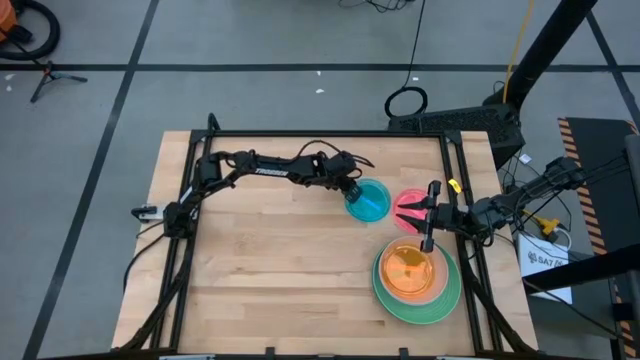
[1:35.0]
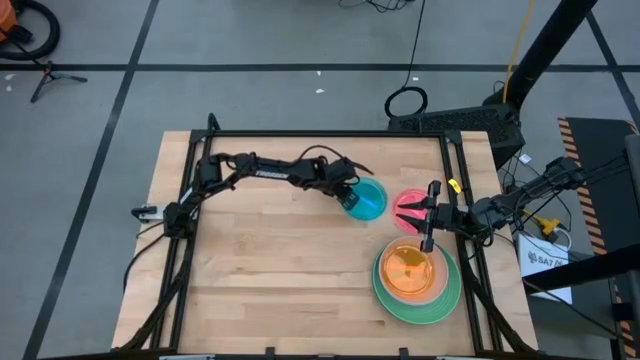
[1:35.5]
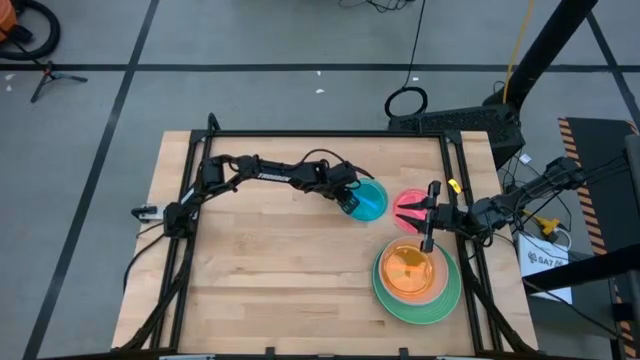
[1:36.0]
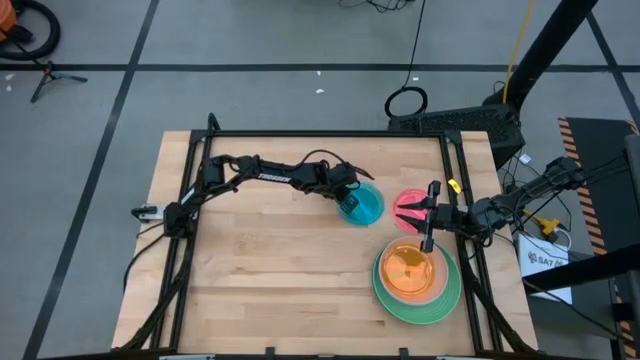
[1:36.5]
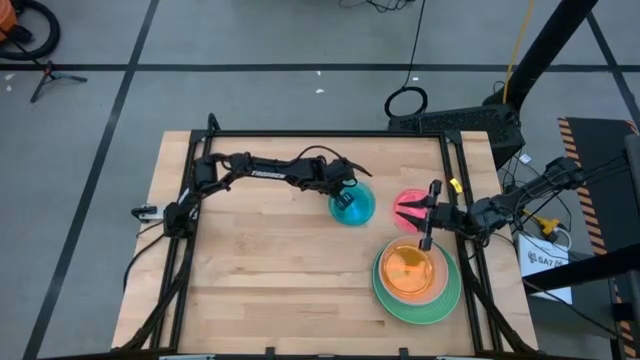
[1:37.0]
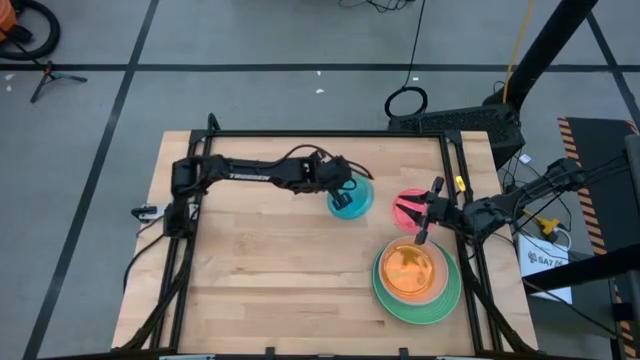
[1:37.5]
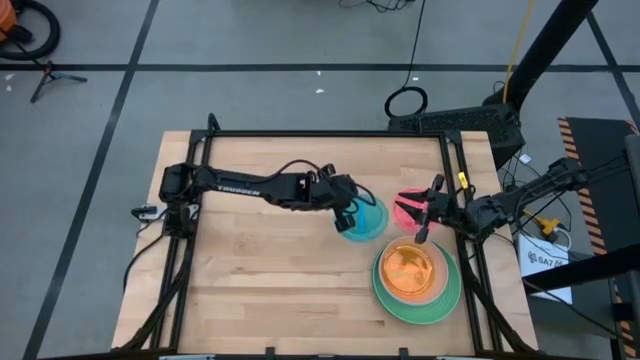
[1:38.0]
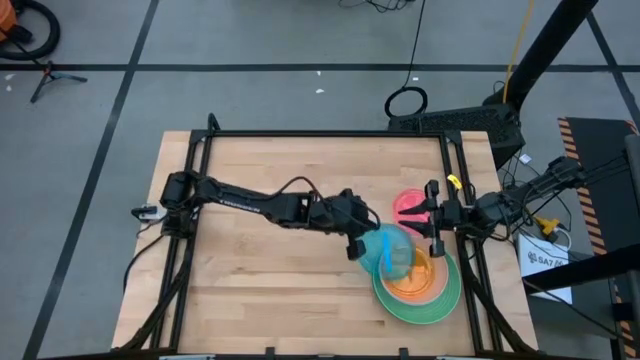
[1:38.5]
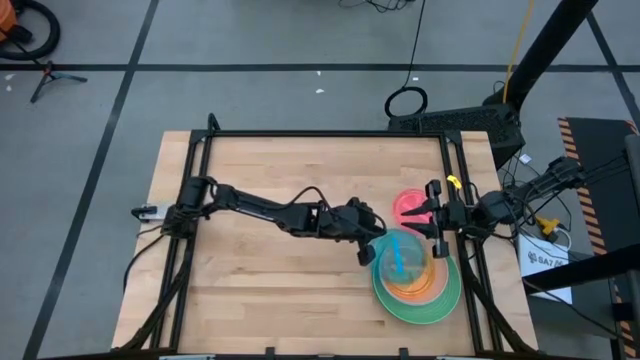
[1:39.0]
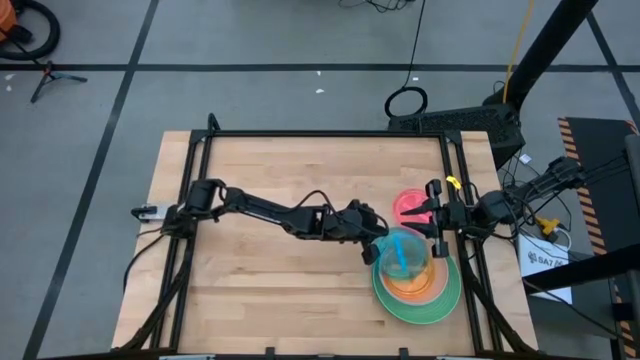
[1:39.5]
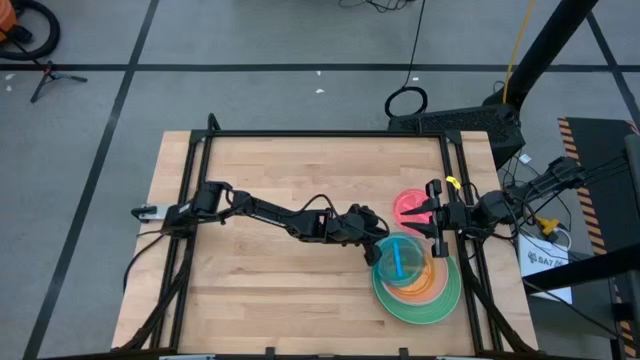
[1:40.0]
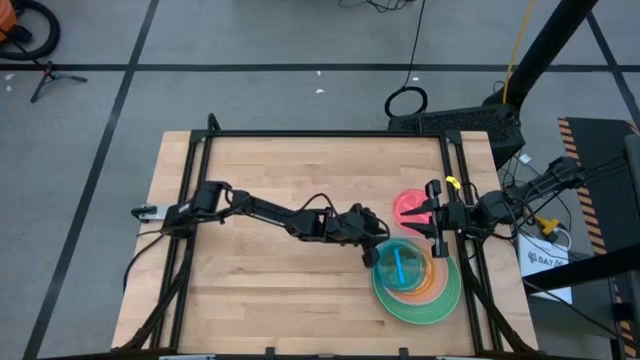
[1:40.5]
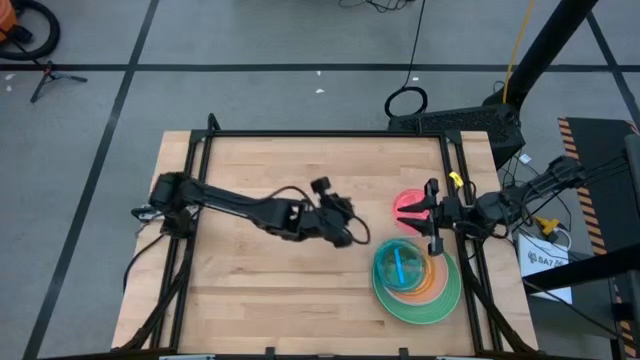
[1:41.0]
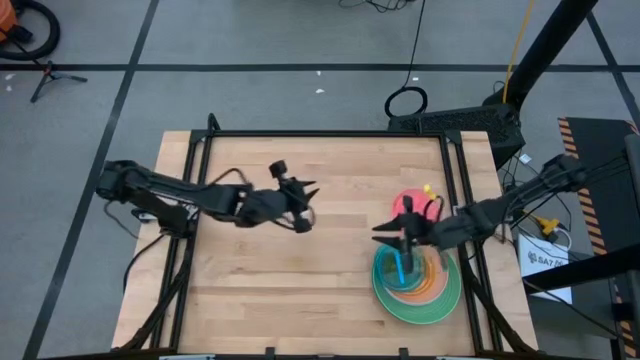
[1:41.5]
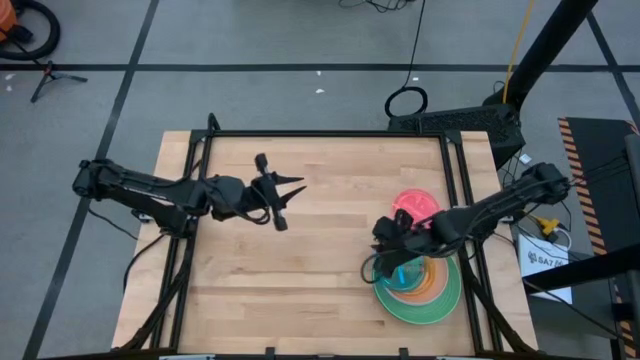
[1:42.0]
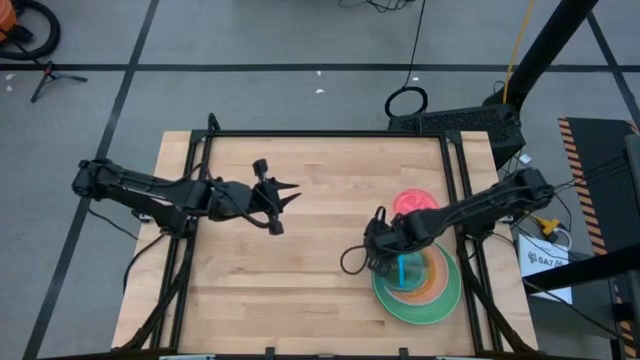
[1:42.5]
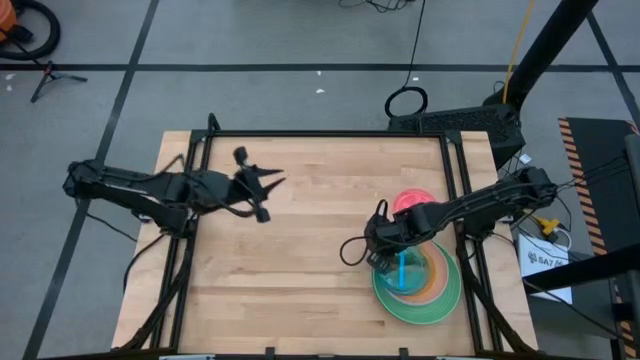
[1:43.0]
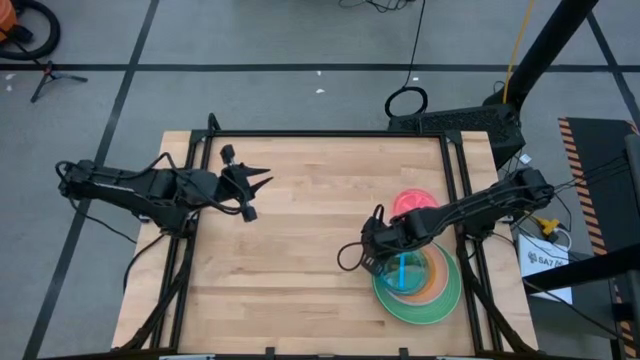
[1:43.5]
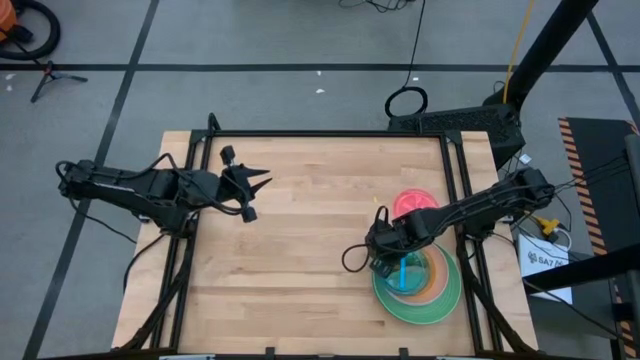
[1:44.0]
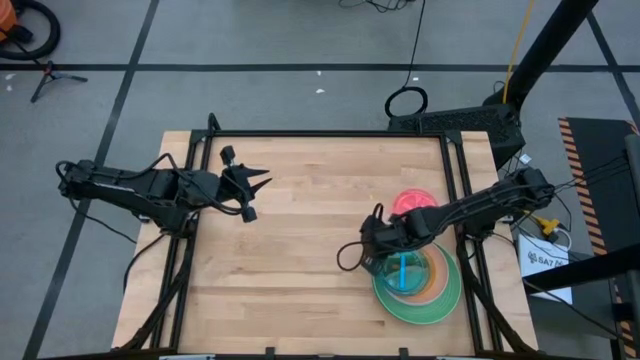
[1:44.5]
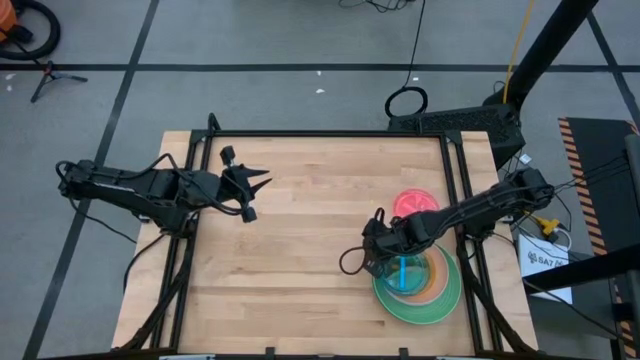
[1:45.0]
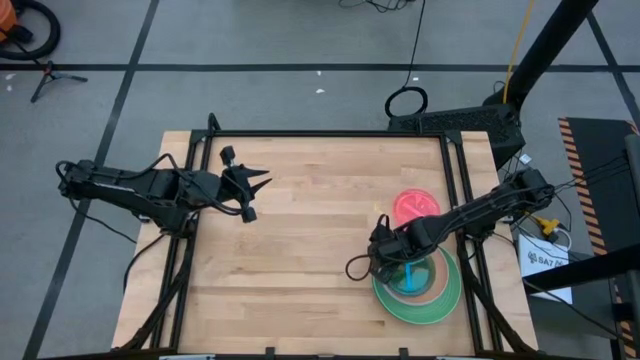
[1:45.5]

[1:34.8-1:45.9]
Task: Stack plastic plates
Stack the blue transparent plate on top of the orange transparent plate

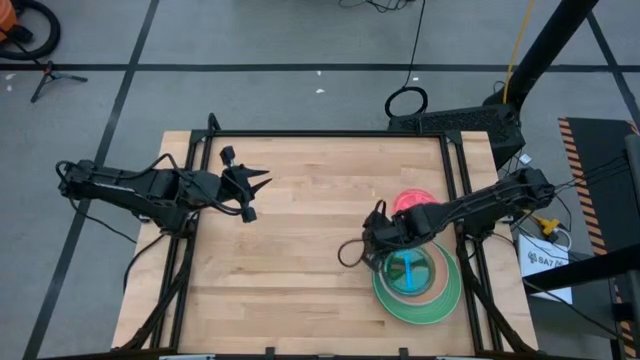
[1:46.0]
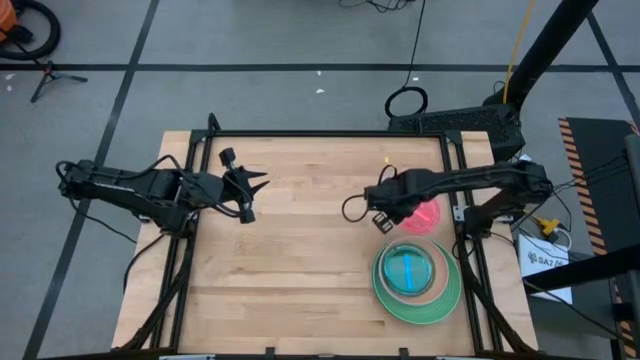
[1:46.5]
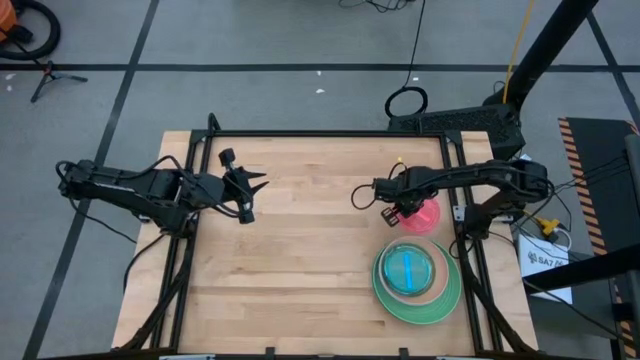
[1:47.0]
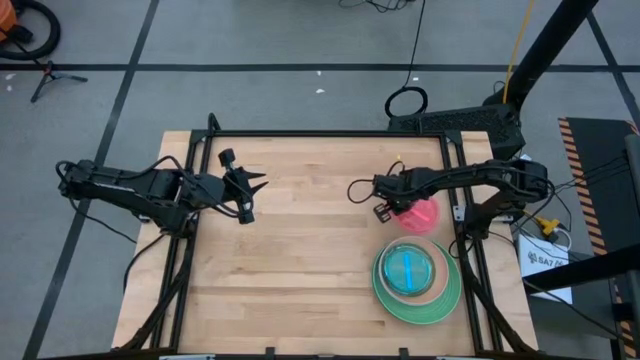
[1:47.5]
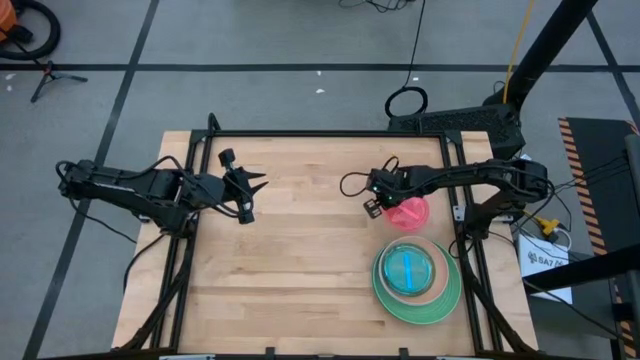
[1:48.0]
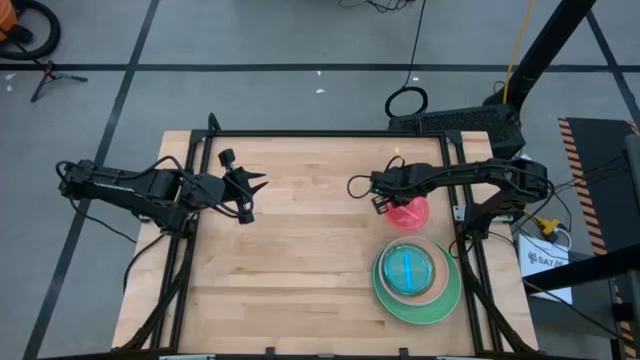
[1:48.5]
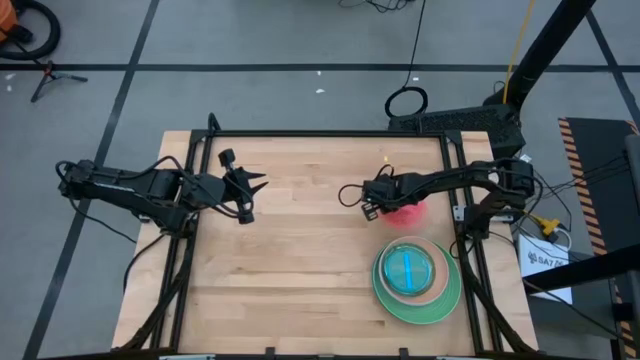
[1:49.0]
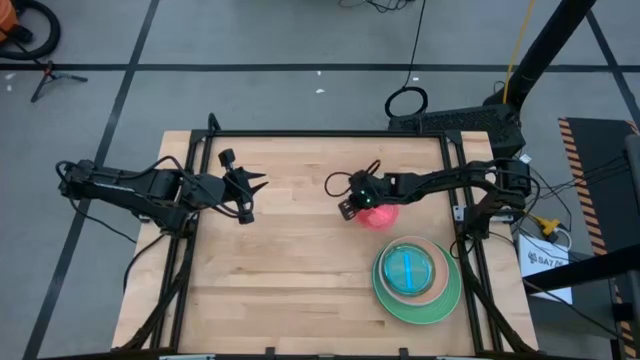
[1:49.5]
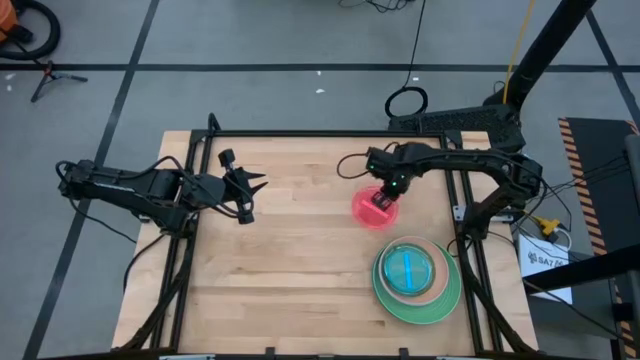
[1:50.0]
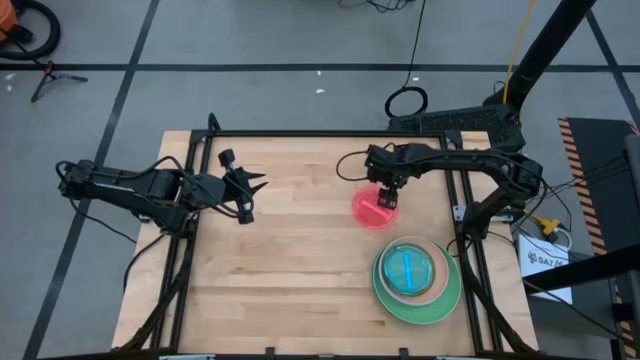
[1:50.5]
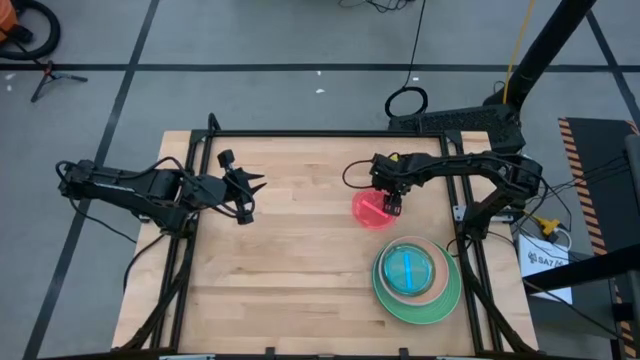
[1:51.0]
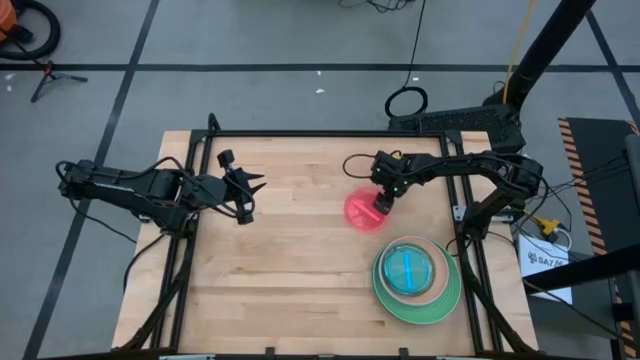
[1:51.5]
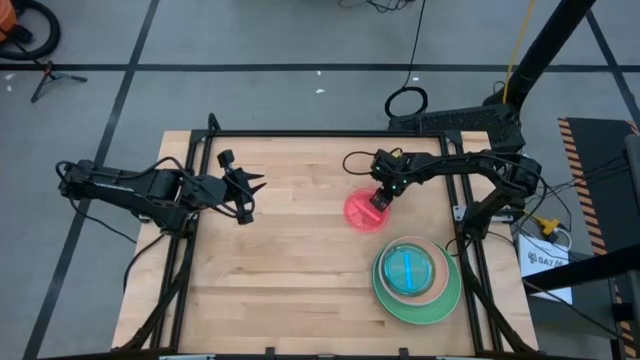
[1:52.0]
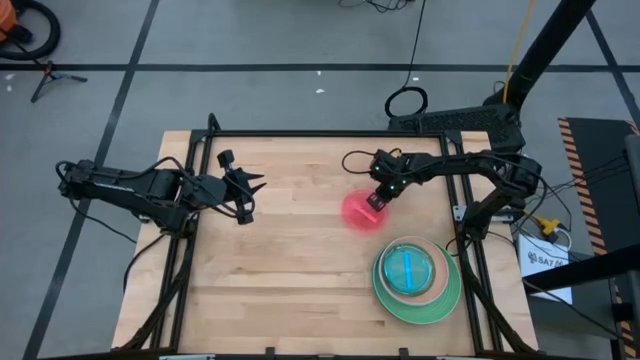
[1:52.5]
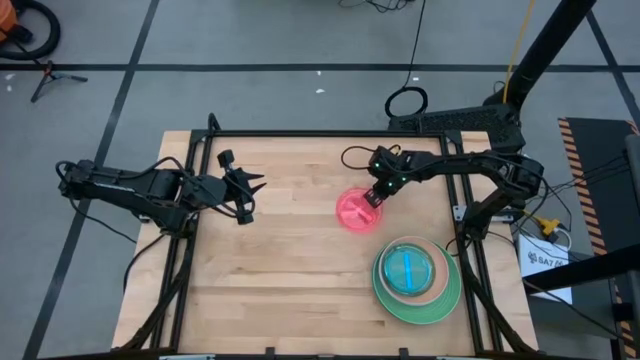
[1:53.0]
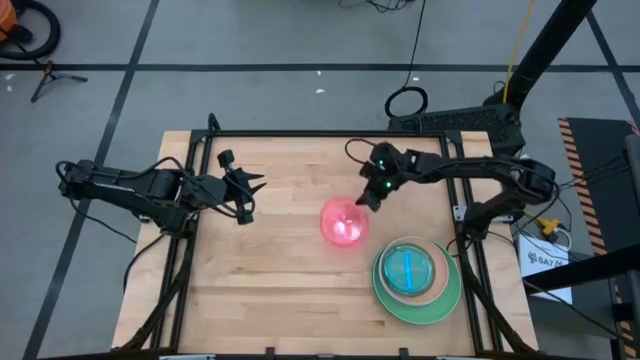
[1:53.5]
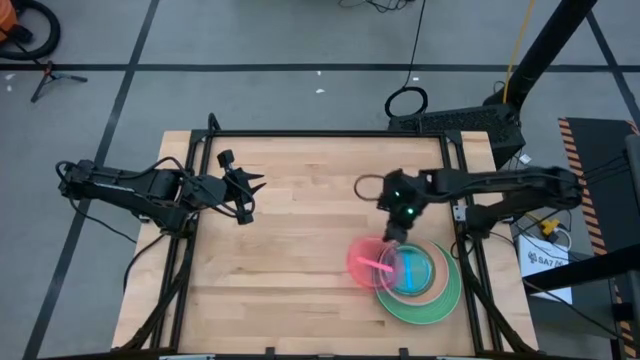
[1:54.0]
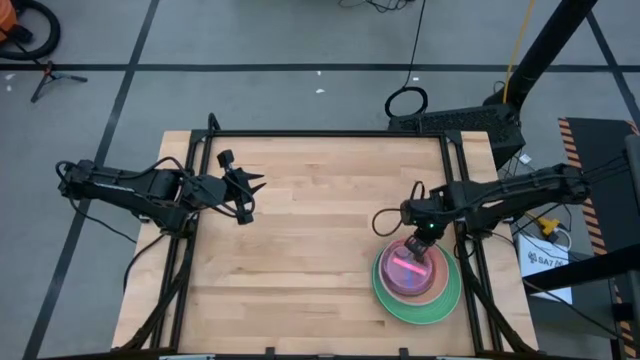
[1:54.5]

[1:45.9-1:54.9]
Stack the pink transparent plate on top of the blue transparent plate
